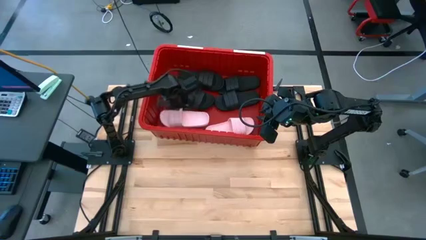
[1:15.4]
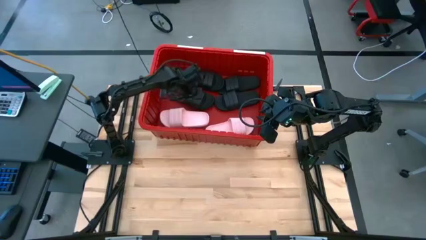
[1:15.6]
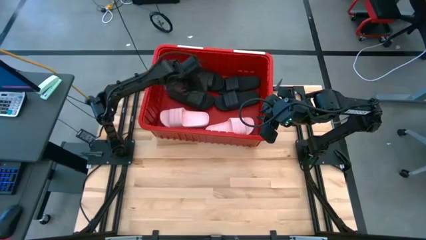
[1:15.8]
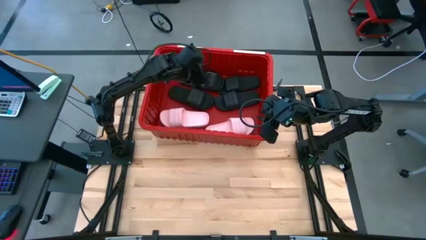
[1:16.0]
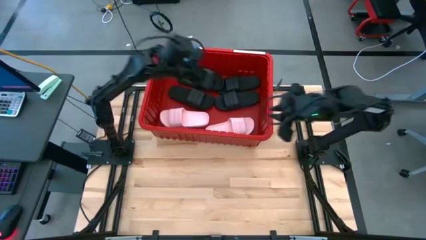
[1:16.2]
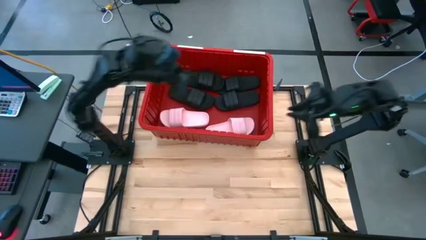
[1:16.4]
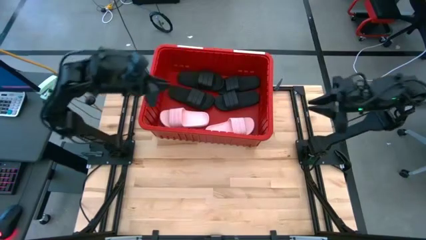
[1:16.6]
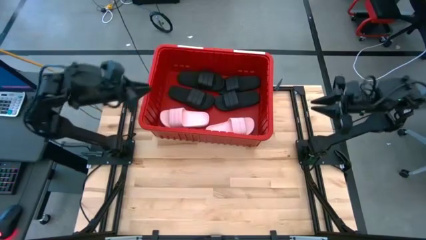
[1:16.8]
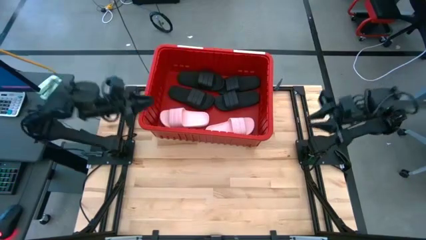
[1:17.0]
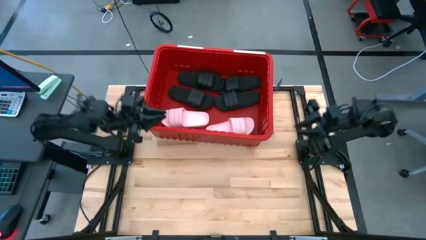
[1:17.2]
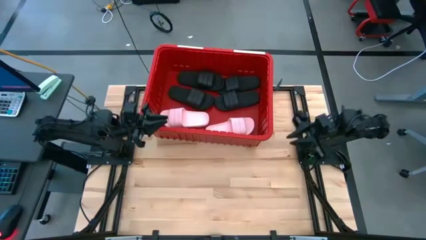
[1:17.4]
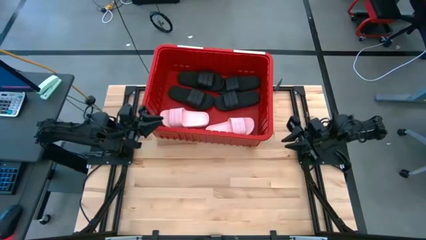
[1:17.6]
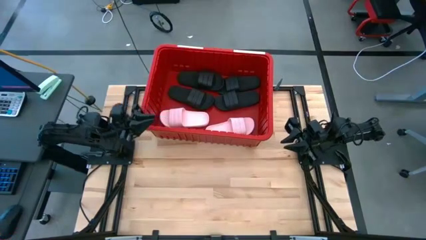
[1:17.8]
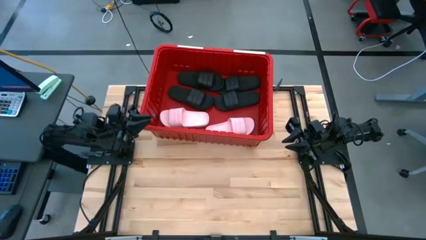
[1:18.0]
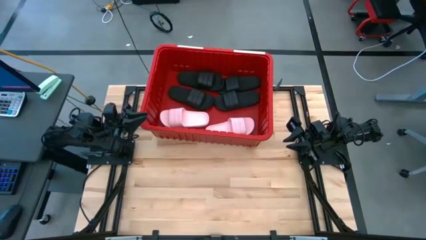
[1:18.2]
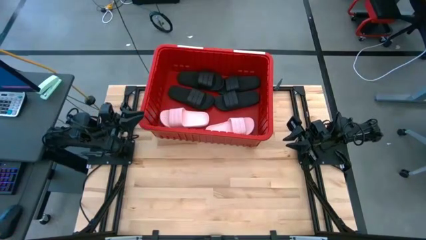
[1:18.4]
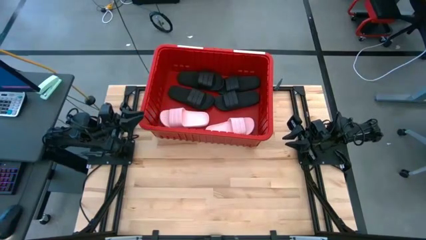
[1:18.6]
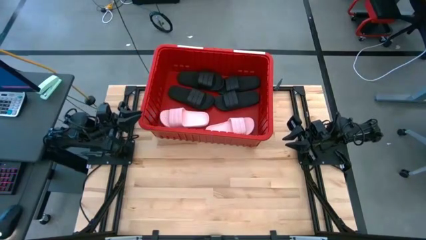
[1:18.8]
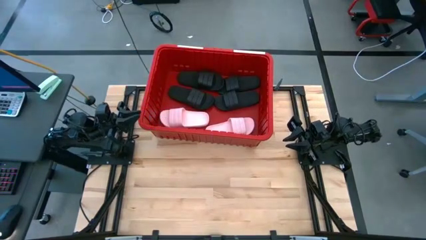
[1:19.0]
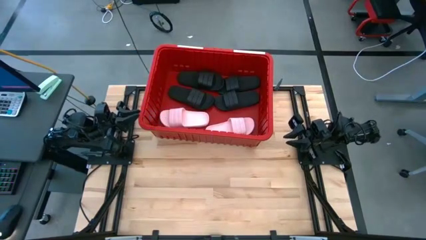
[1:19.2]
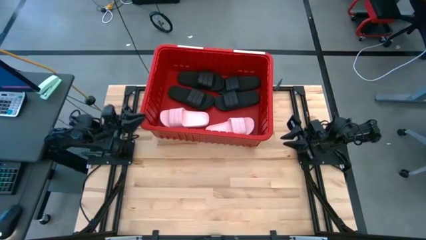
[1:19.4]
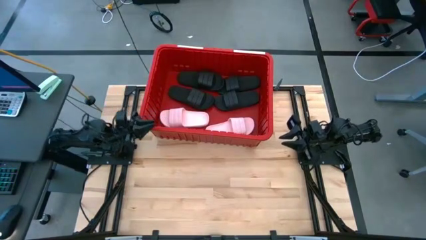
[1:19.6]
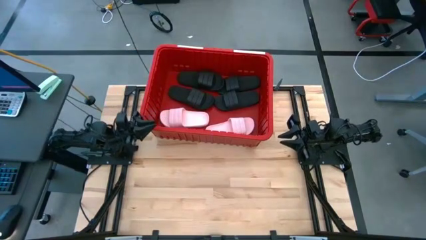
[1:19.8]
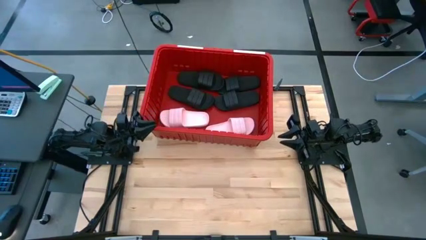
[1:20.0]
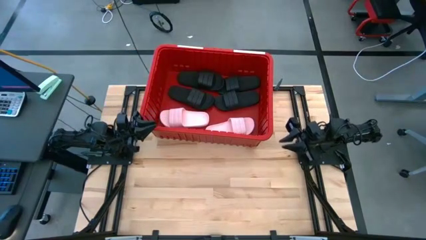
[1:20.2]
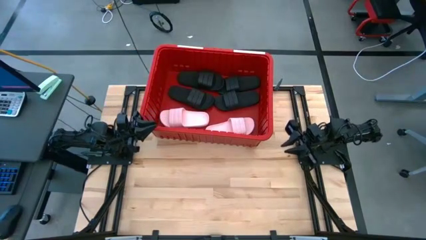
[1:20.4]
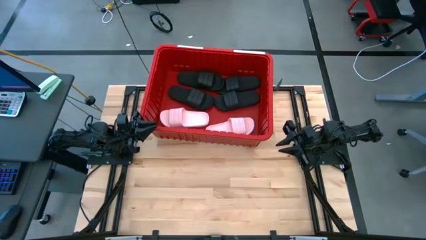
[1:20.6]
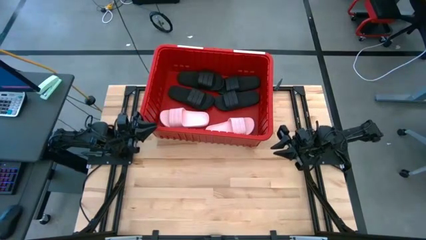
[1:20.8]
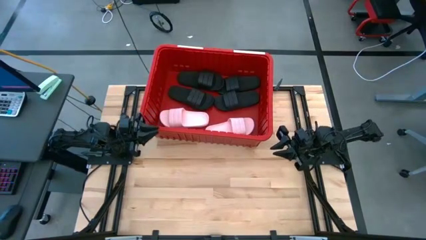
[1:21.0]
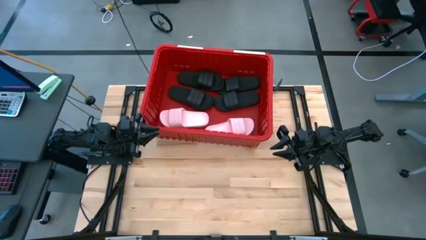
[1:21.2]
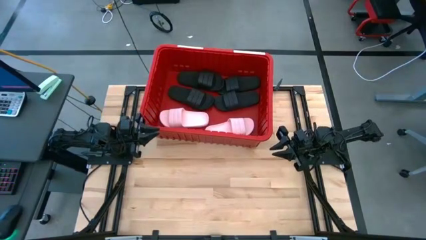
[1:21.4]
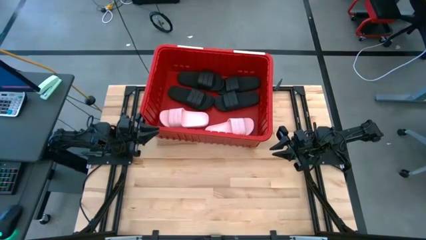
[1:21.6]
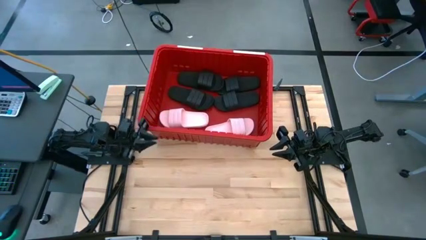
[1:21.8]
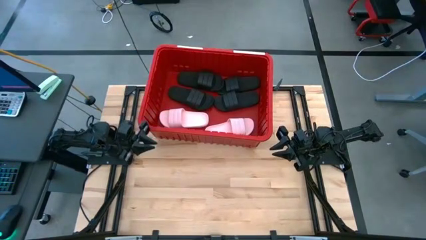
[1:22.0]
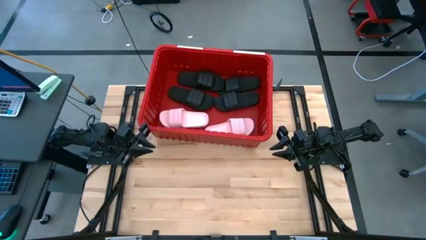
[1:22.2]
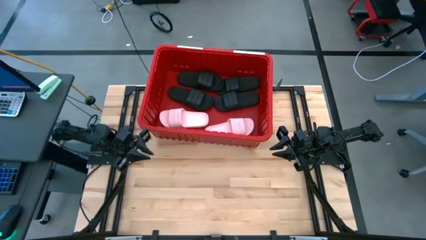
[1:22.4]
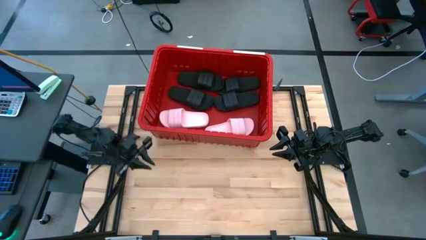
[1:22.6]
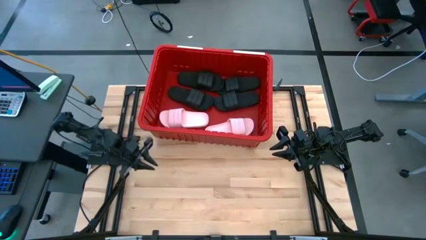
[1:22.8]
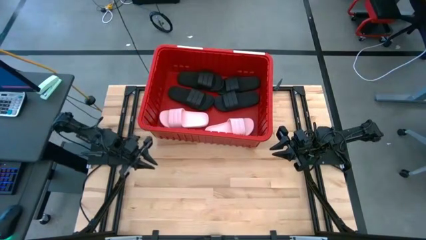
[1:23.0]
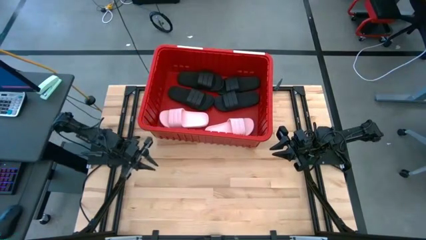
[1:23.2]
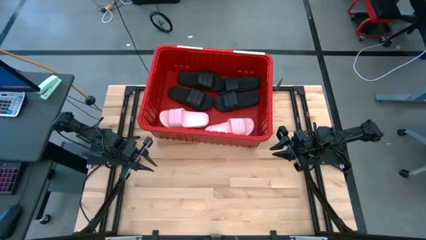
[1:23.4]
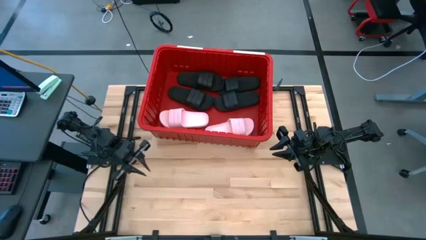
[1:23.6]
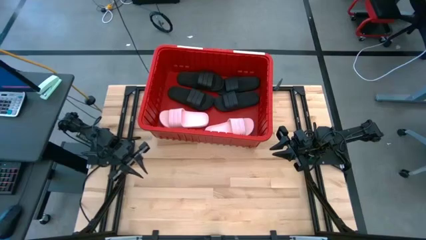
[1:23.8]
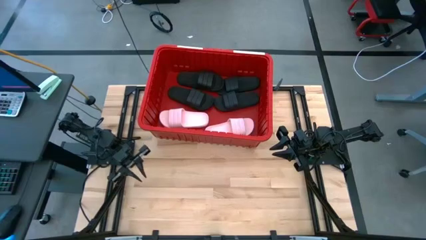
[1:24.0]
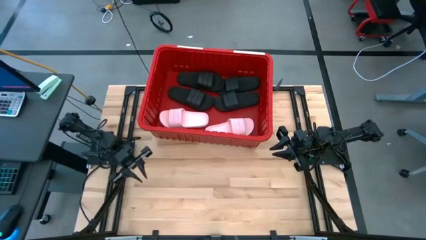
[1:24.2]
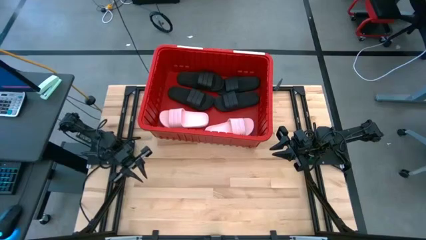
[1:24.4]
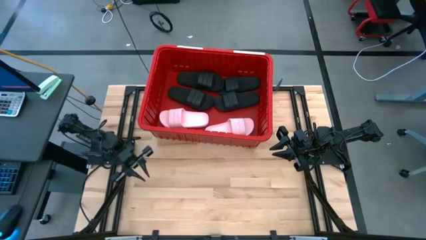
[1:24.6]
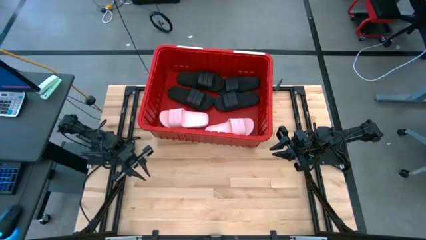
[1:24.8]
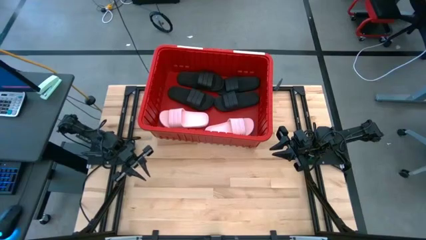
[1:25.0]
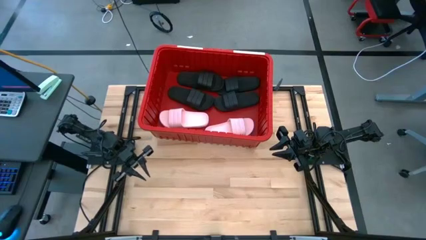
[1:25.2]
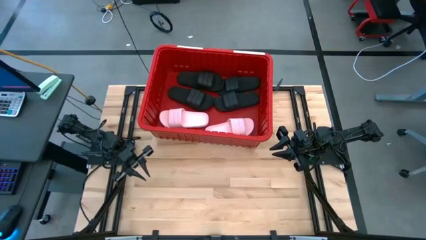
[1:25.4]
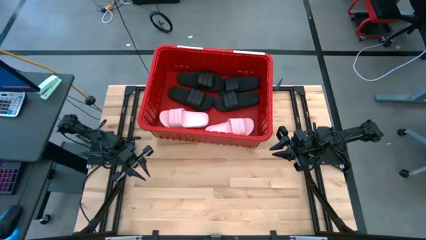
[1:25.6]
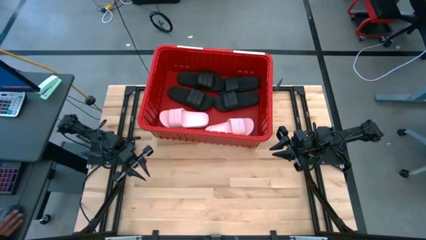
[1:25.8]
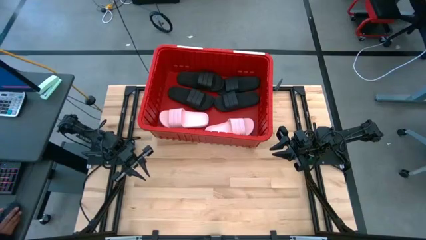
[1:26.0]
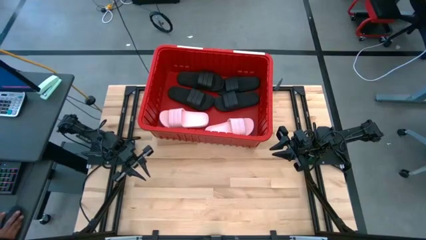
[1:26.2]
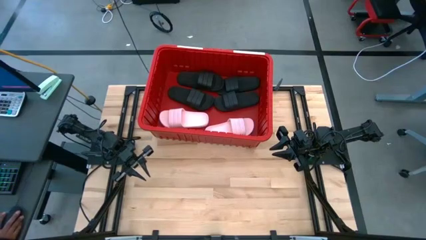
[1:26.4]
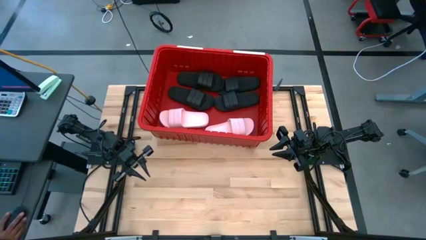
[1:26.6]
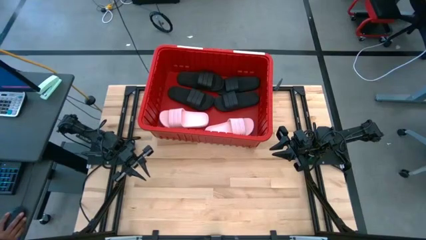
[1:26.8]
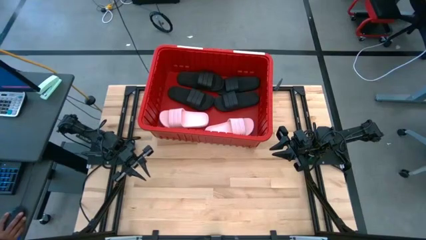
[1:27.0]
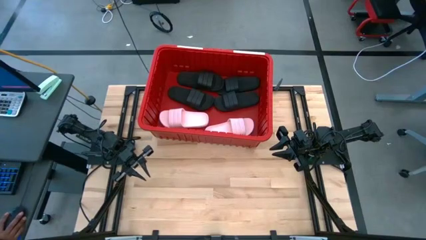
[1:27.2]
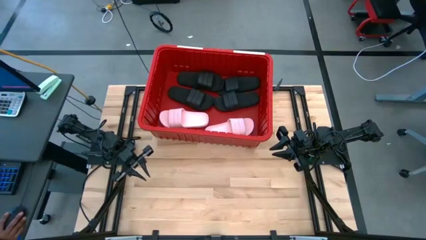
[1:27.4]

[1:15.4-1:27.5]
Task: Pick and place slides into bin
Return to Home Position

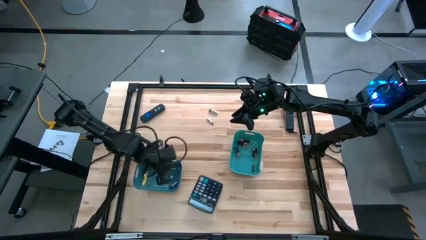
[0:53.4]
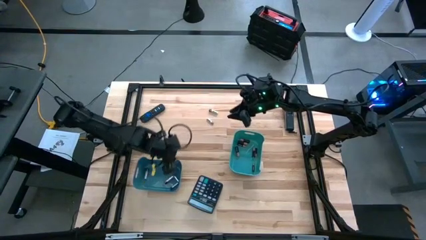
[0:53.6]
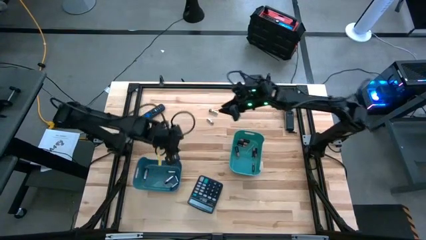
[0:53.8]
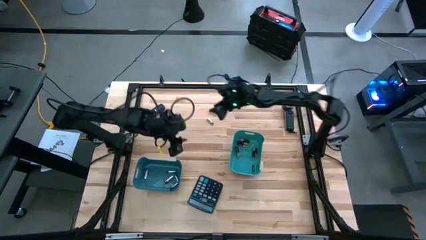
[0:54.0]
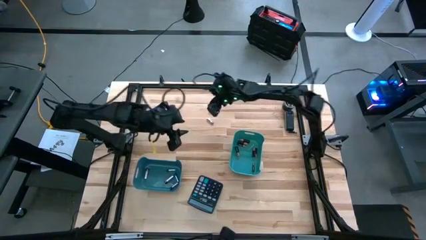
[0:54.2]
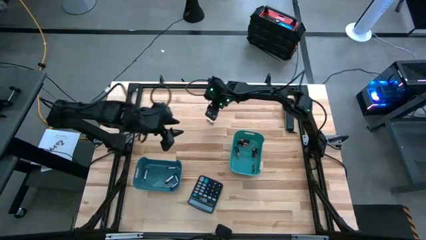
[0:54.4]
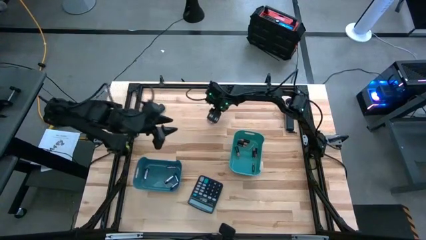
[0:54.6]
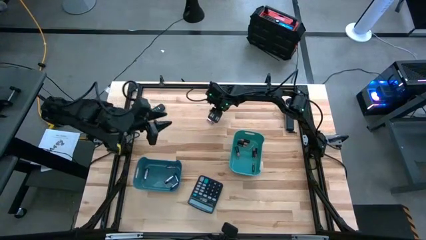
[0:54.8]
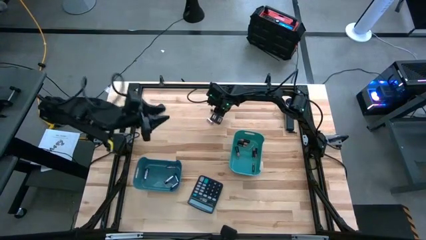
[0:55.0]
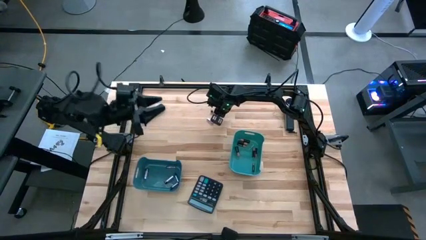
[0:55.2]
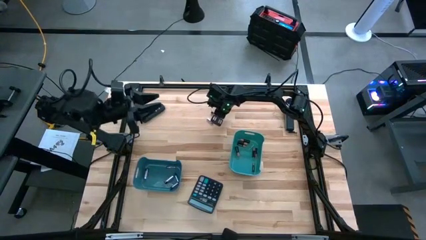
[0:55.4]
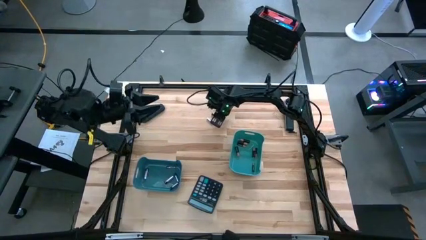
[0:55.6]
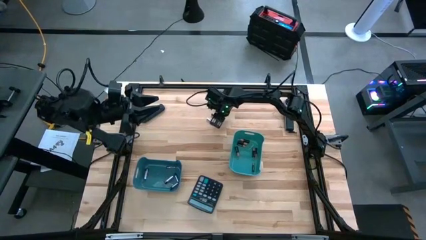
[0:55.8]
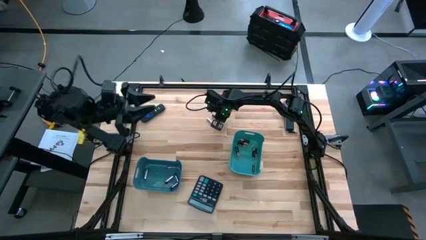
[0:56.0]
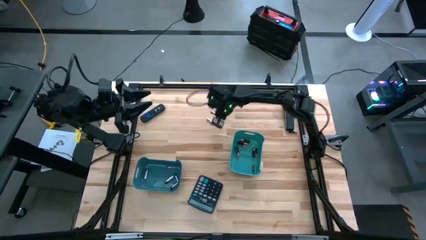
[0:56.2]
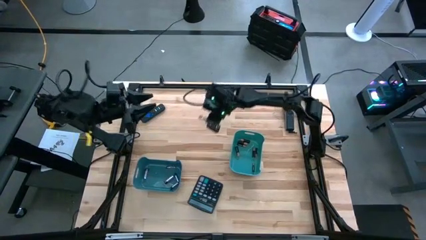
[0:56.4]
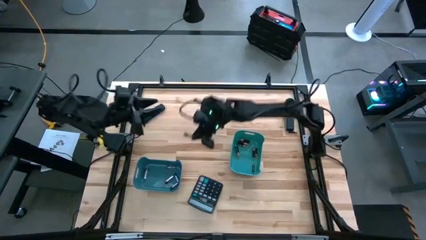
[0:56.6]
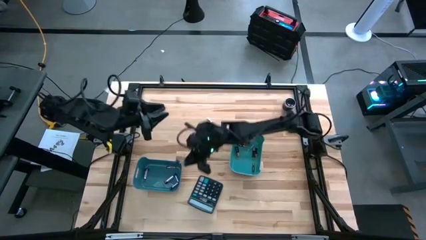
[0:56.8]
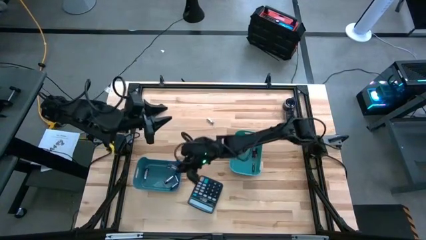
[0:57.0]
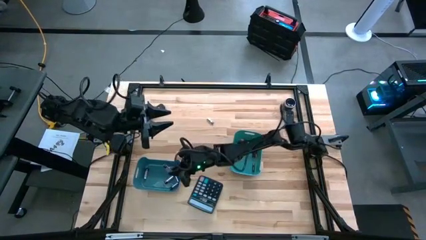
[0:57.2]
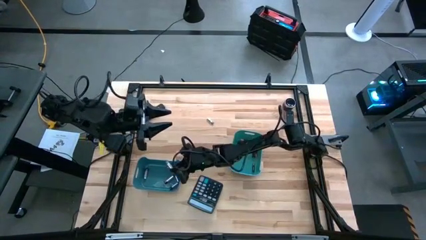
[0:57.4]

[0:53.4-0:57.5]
Task: Sort batteries
Put the silver battery into the dark blue bin
